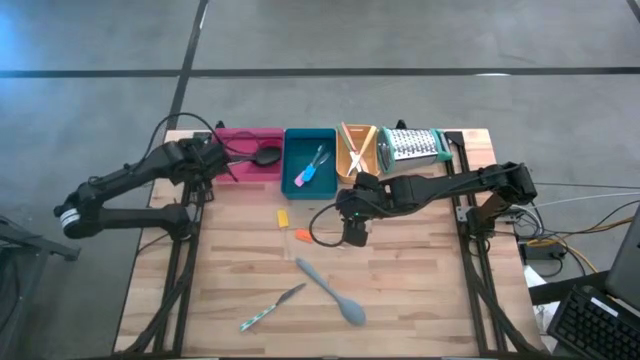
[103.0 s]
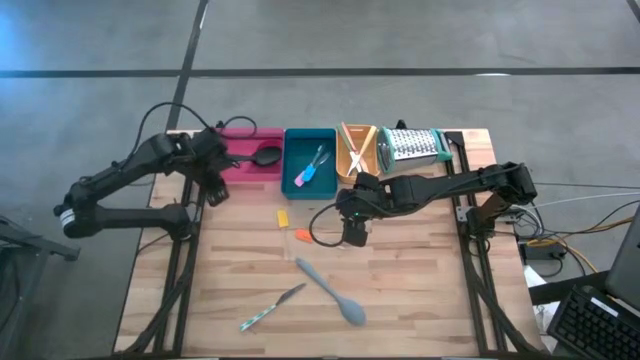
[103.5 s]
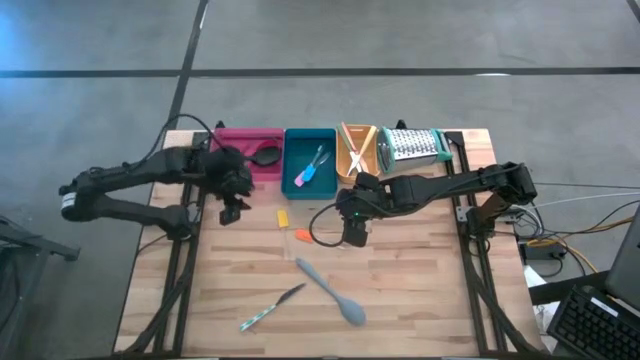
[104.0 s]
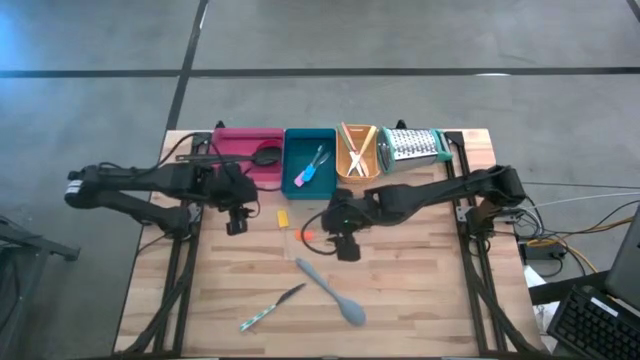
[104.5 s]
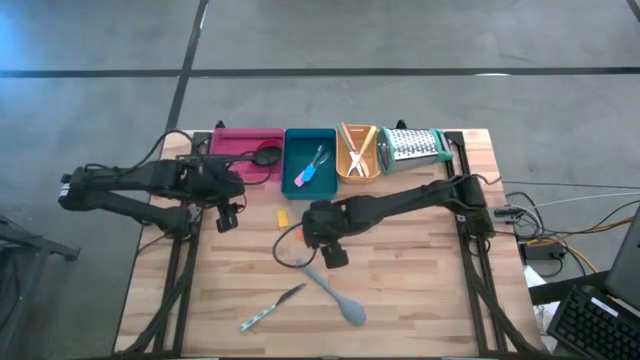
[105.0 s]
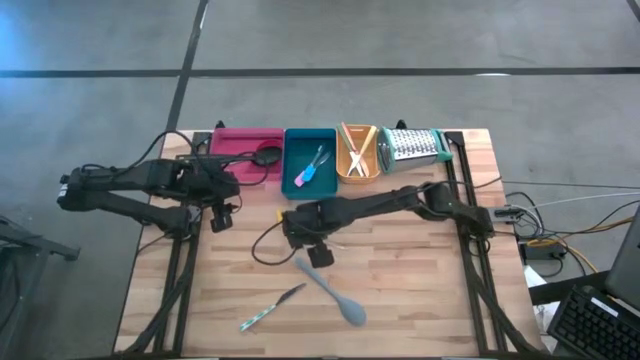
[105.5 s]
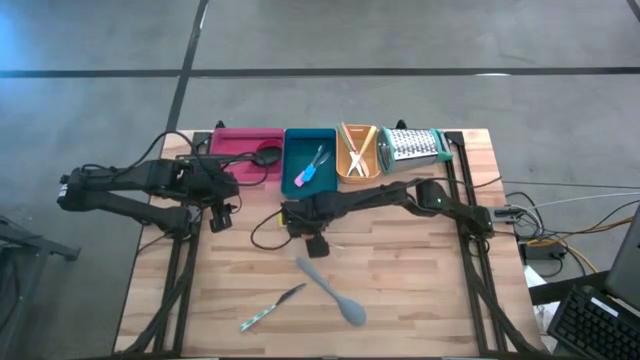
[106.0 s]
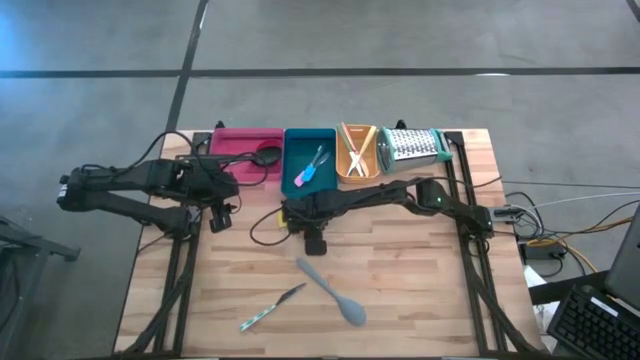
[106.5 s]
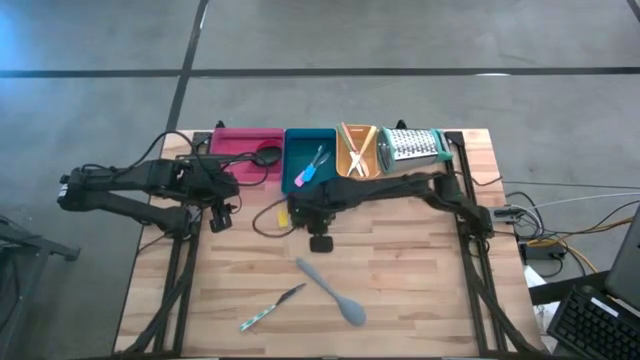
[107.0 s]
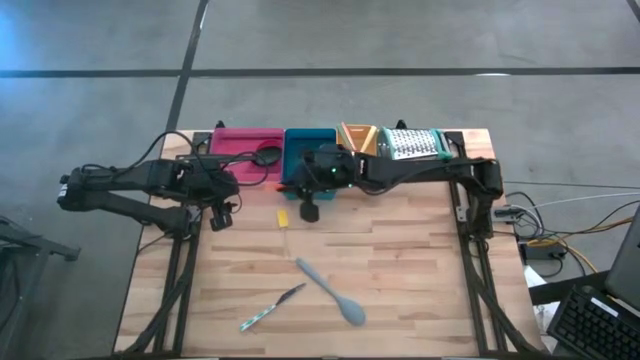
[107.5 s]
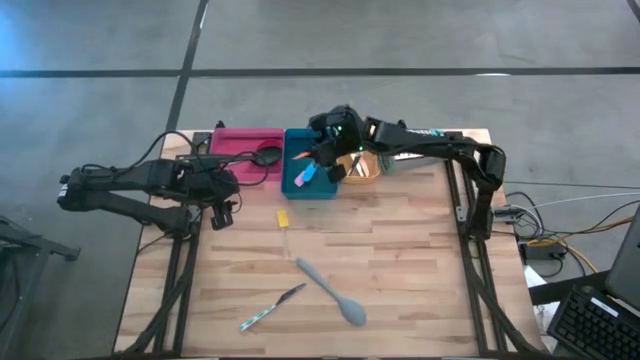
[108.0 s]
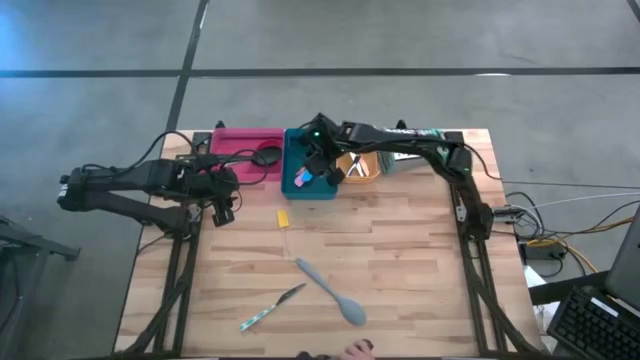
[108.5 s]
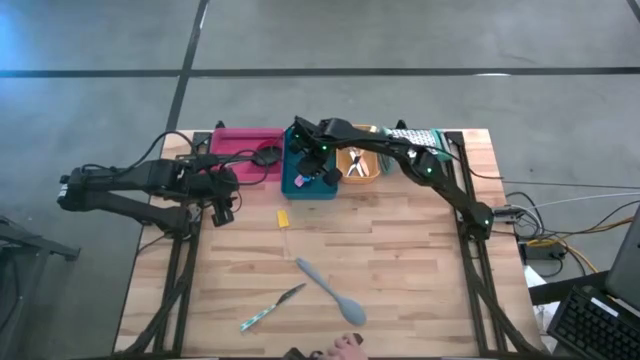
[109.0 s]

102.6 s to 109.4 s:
Task: Pick & Place Kitchen Items
Put the orange spatula into the blue bin

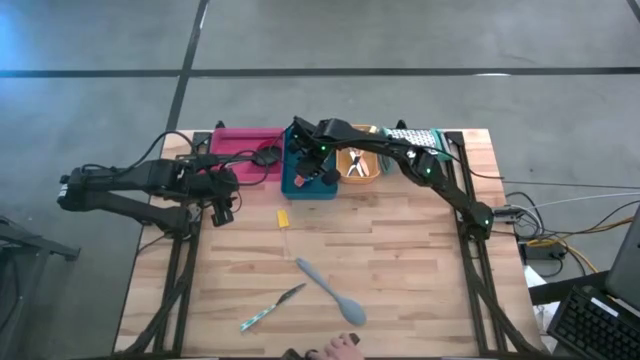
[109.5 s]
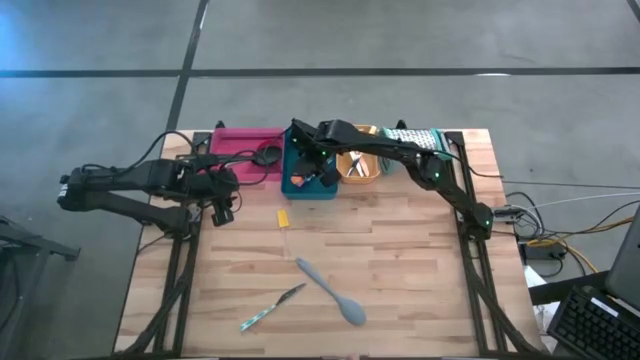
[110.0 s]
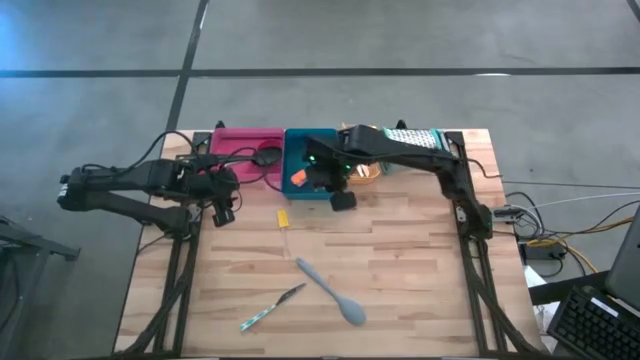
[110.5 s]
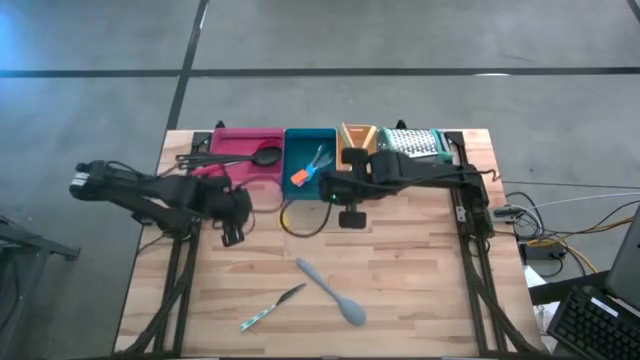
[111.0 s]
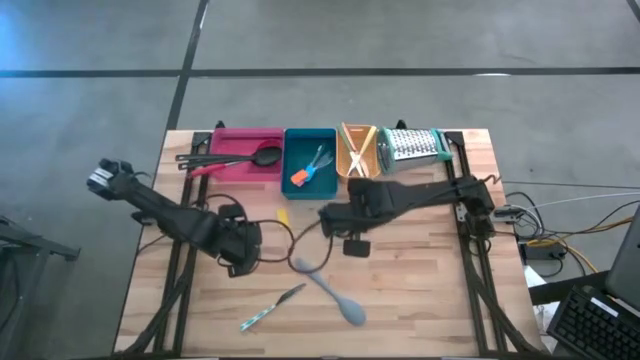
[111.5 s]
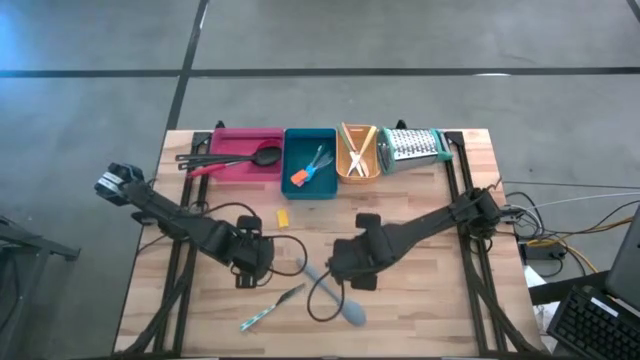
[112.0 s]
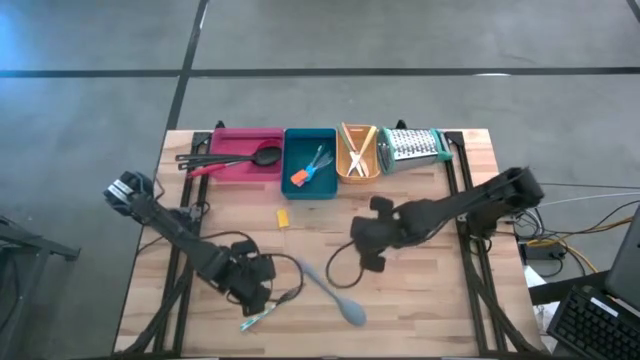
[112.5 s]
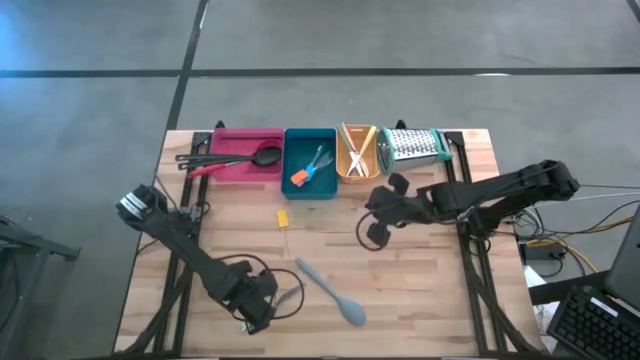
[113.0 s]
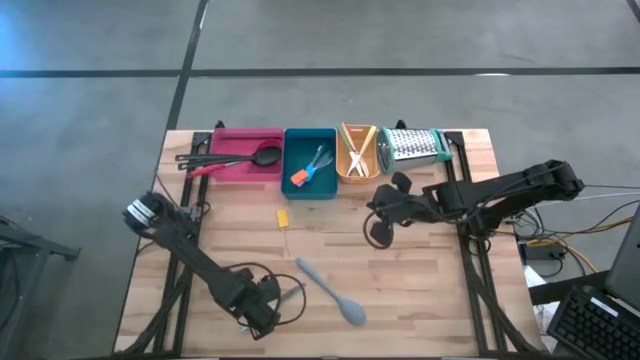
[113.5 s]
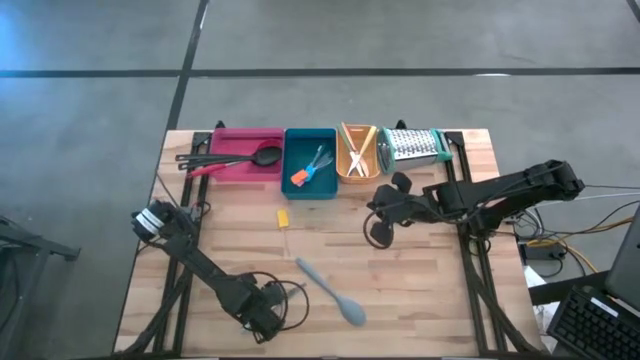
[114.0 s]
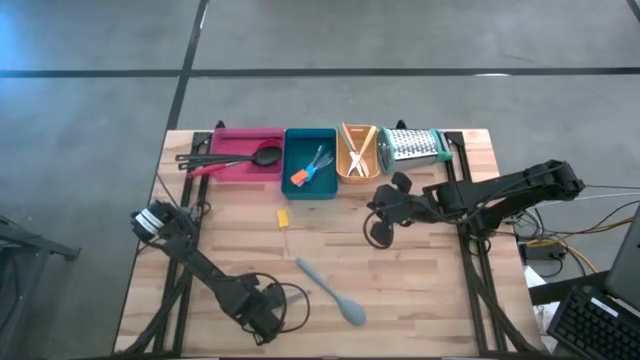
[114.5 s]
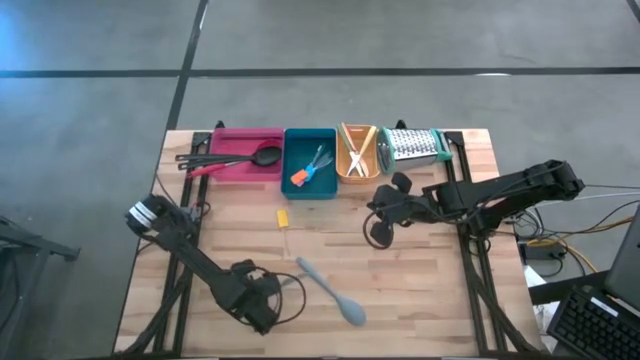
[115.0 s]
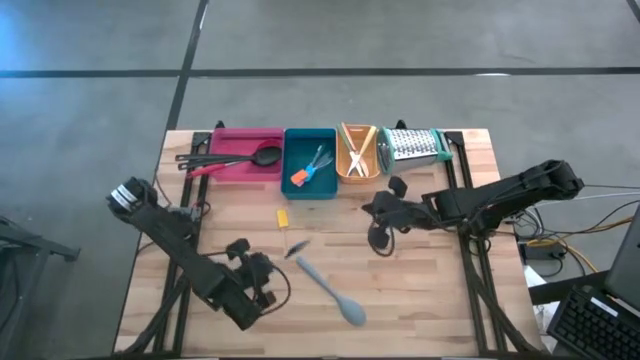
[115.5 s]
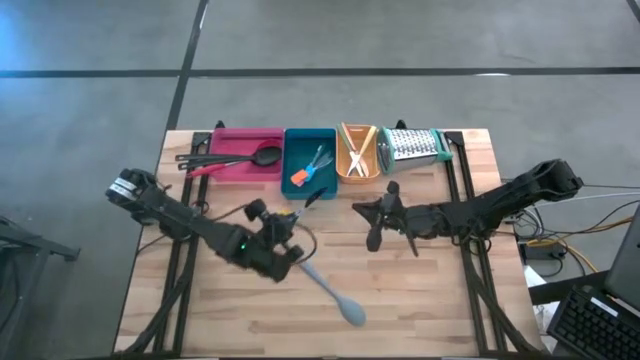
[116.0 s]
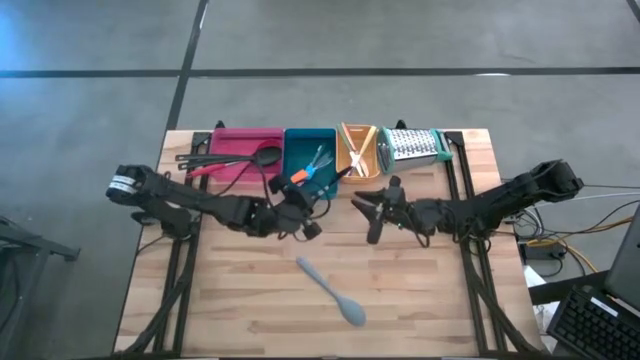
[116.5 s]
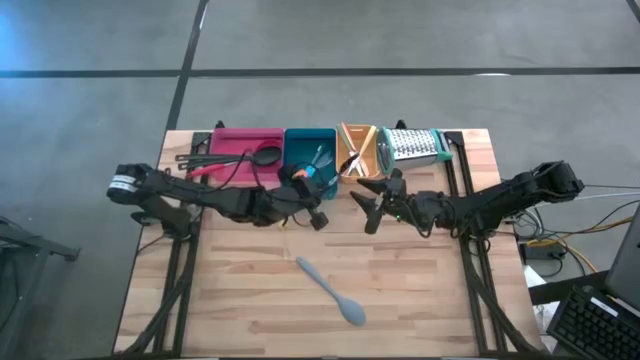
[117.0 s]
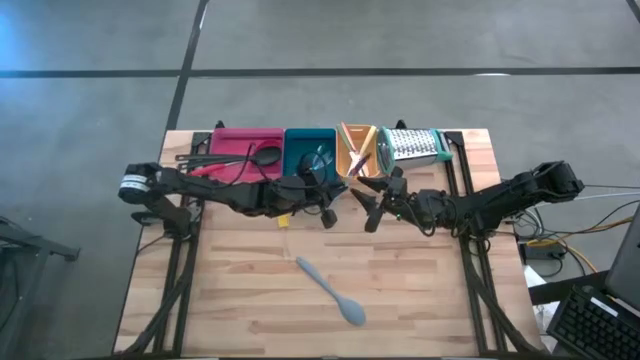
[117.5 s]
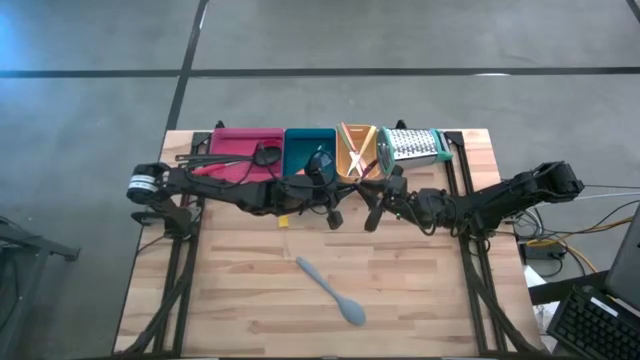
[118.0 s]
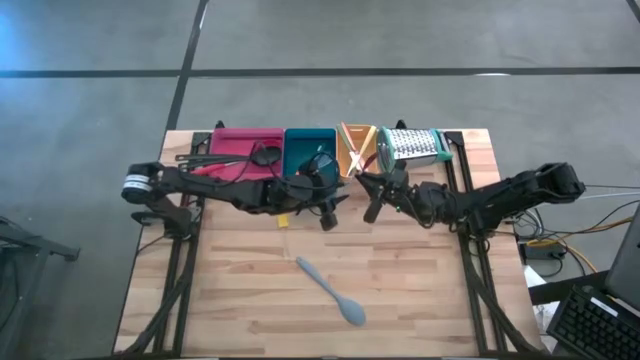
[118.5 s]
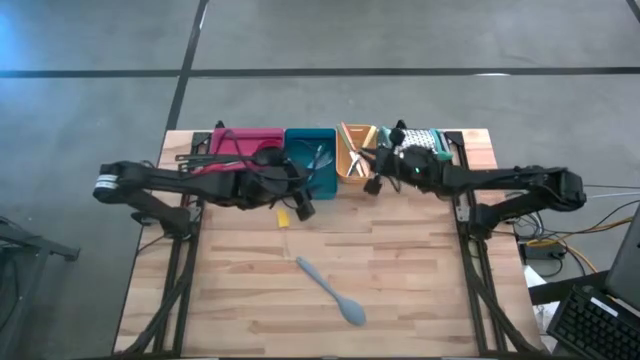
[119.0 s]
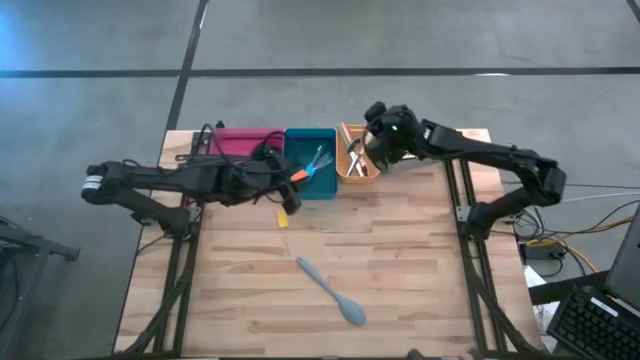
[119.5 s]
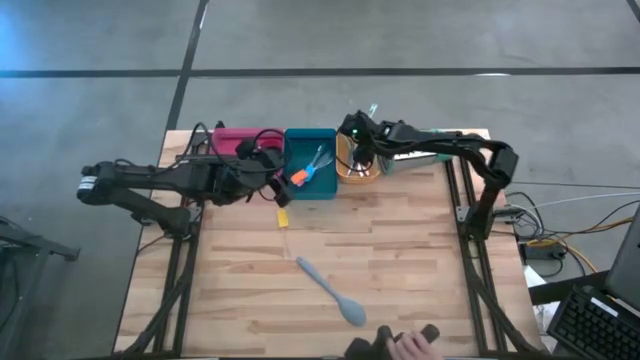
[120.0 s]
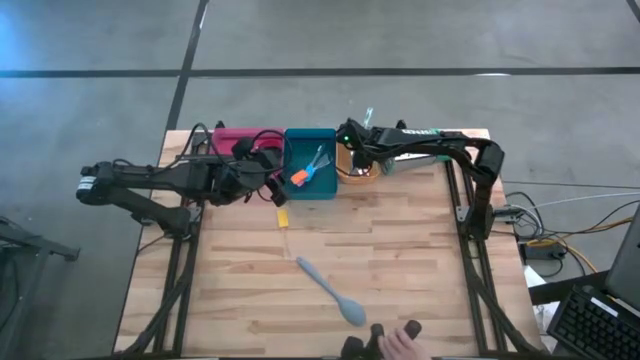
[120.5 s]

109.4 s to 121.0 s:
Put the blue knife into the yellow bin

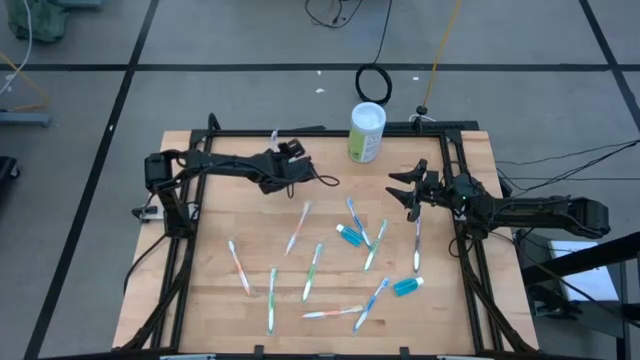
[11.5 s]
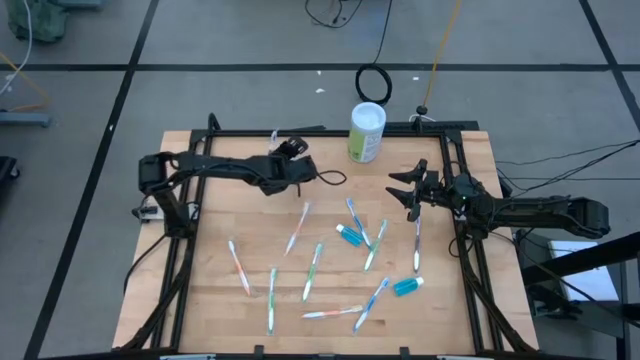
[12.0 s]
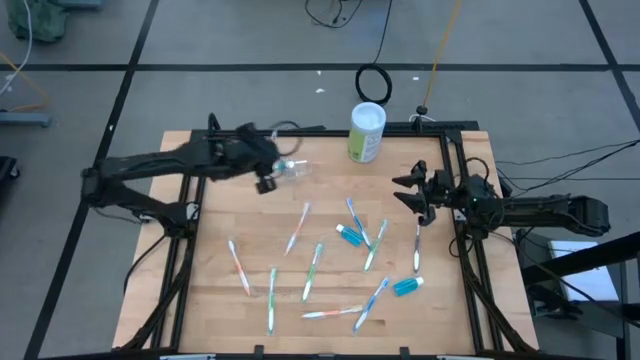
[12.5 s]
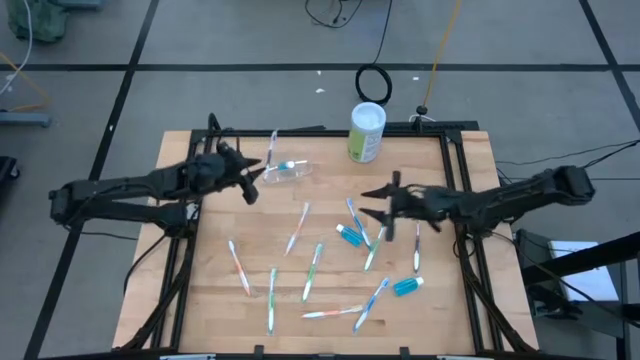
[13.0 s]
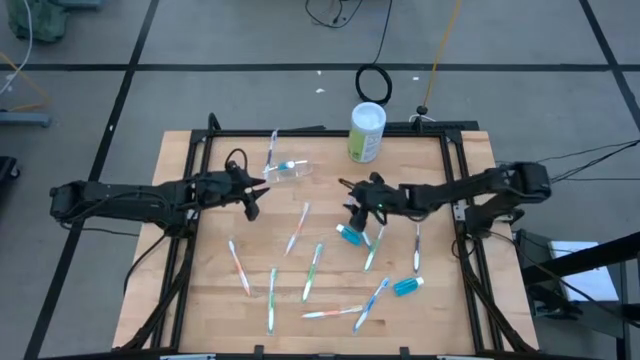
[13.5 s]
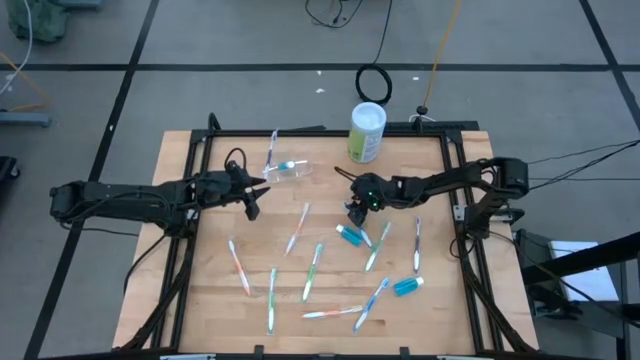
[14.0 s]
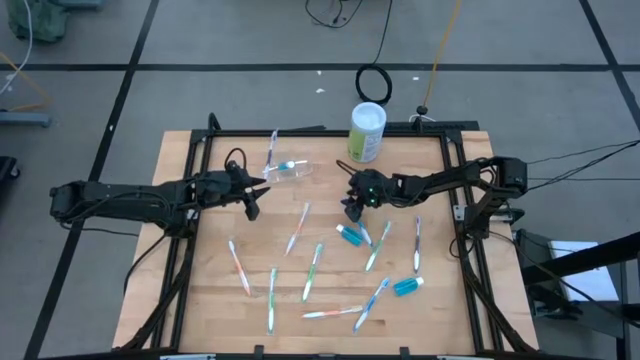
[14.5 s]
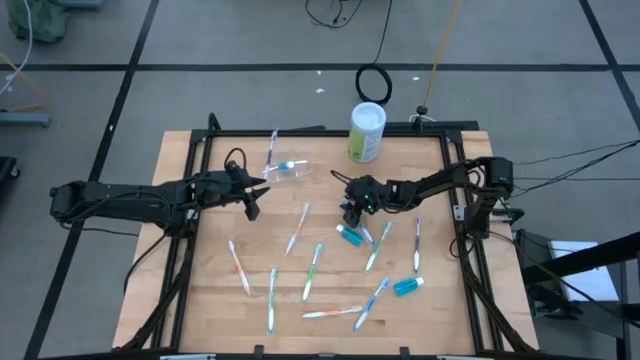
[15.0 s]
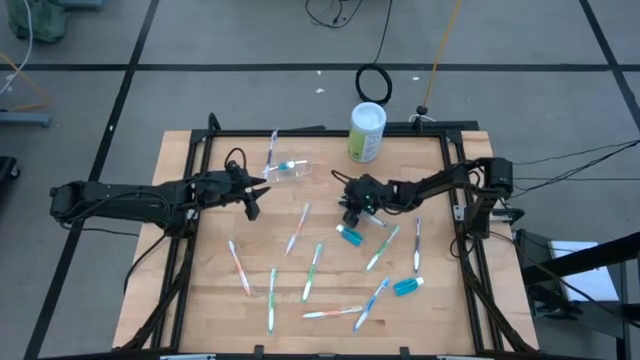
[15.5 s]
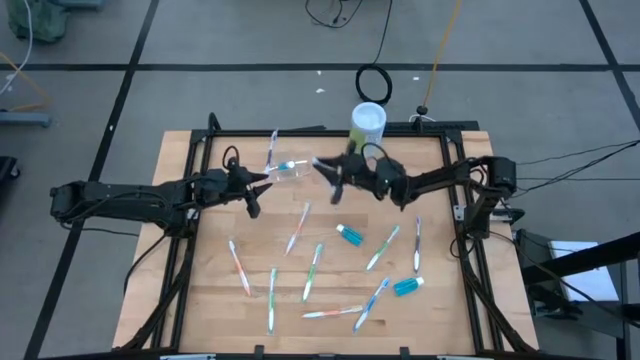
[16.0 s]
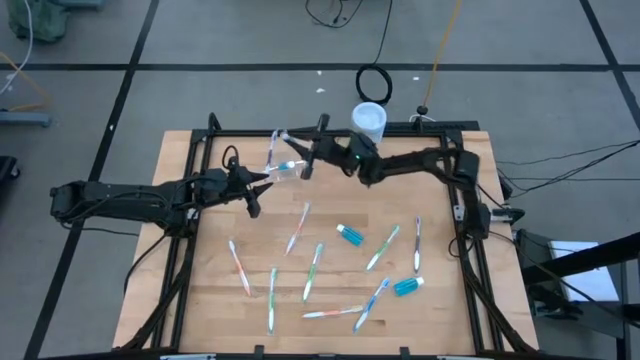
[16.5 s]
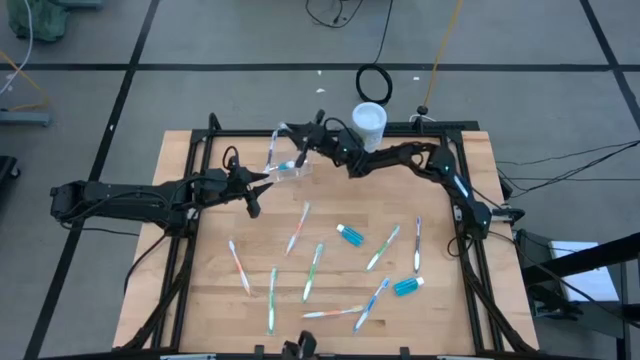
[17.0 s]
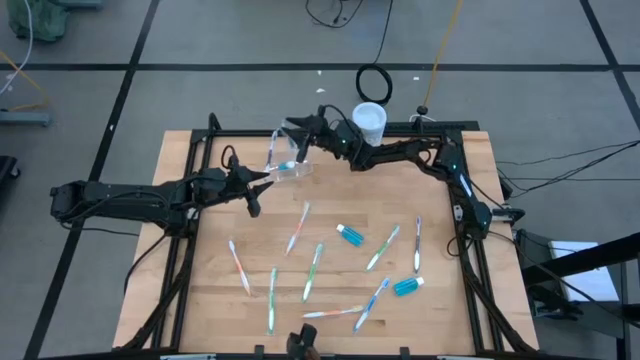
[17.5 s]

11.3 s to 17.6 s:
Task: Pick & Place toothbrushing station
Put the top blue toothbrush into the transparent organizer
